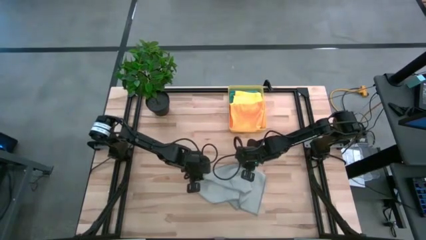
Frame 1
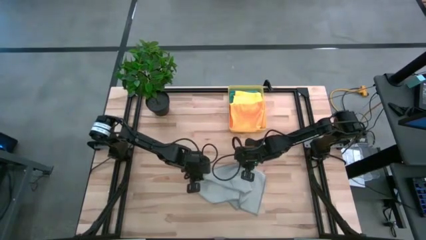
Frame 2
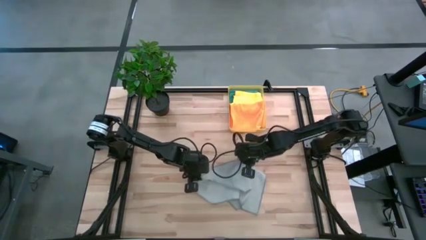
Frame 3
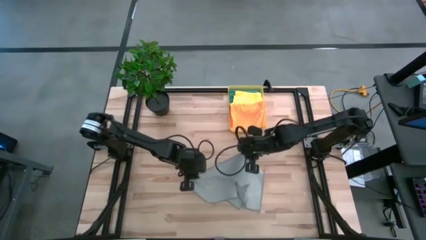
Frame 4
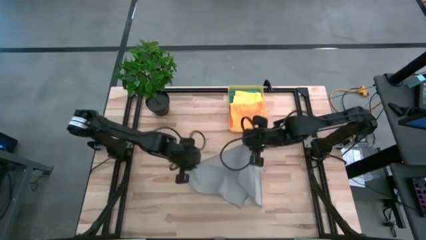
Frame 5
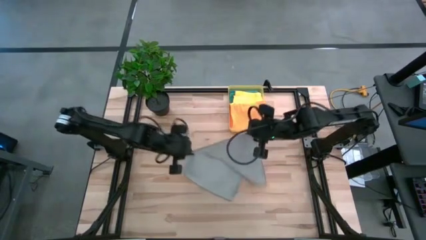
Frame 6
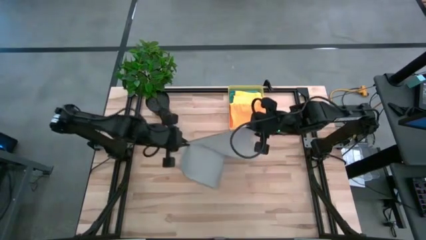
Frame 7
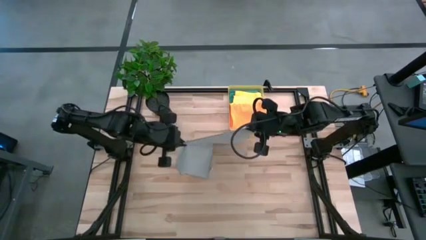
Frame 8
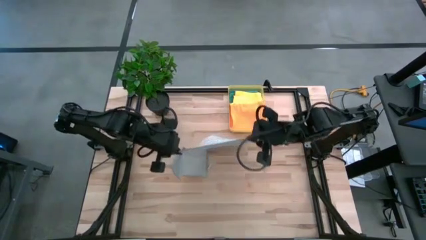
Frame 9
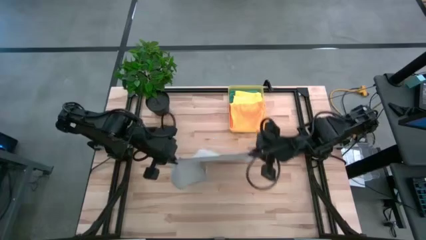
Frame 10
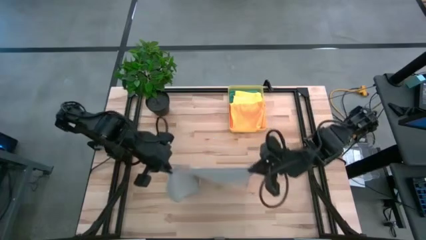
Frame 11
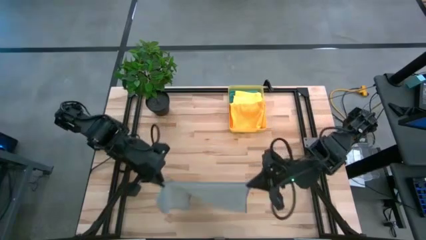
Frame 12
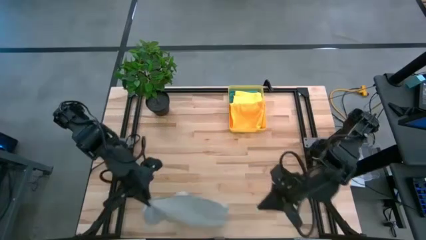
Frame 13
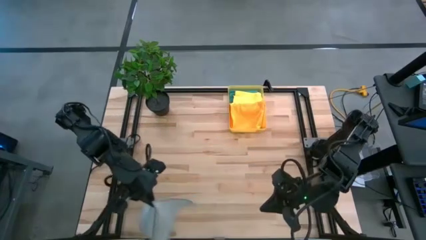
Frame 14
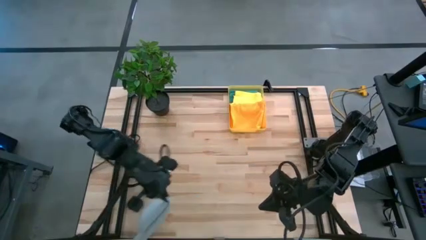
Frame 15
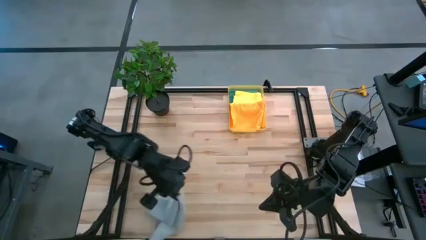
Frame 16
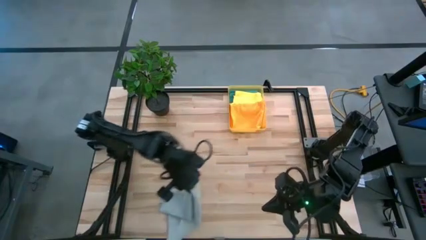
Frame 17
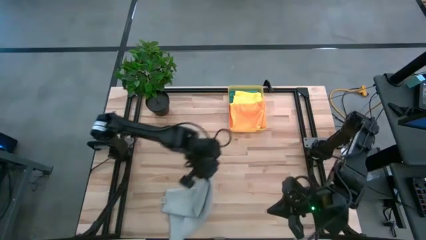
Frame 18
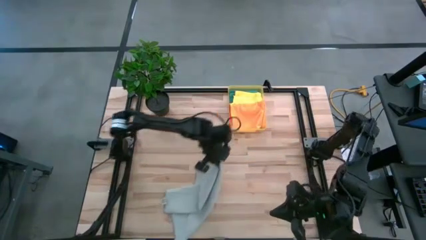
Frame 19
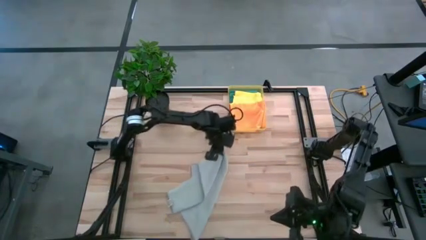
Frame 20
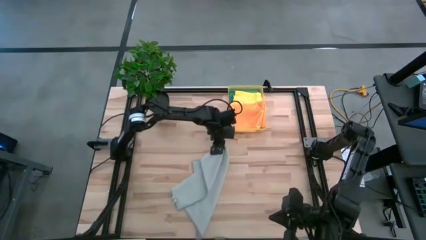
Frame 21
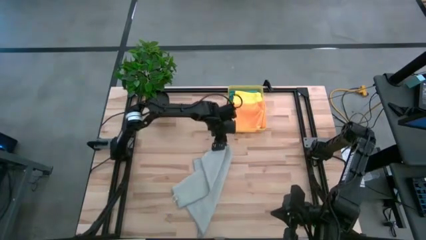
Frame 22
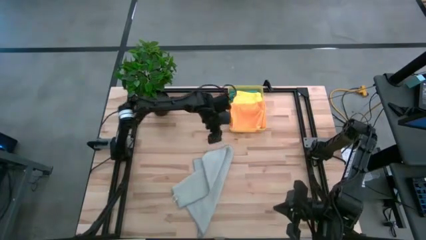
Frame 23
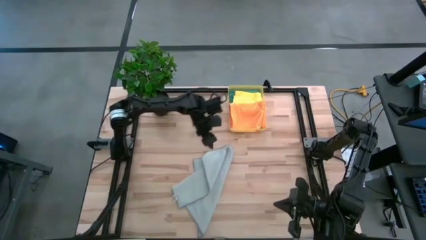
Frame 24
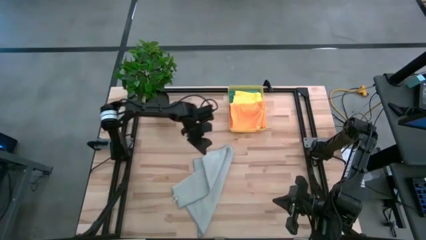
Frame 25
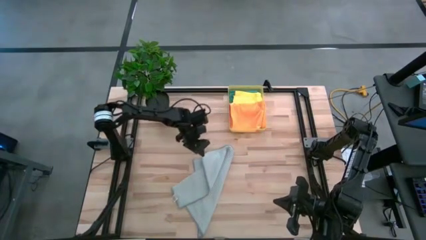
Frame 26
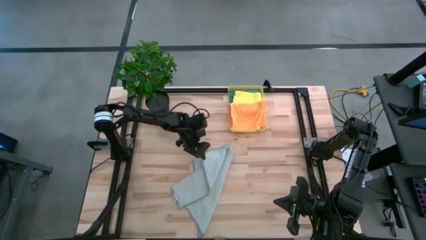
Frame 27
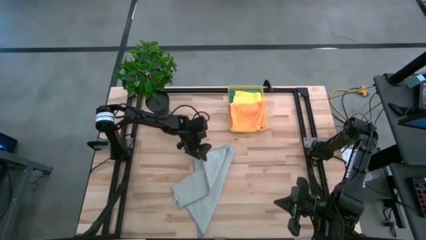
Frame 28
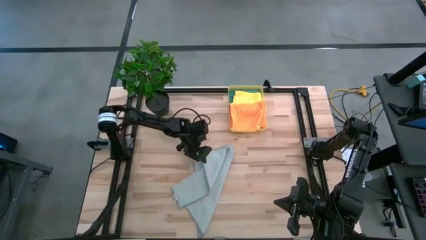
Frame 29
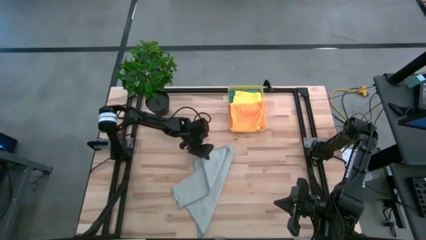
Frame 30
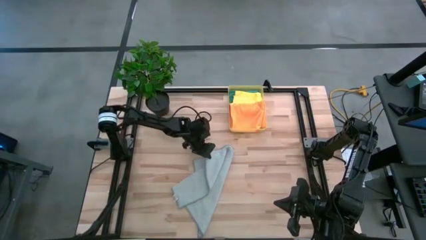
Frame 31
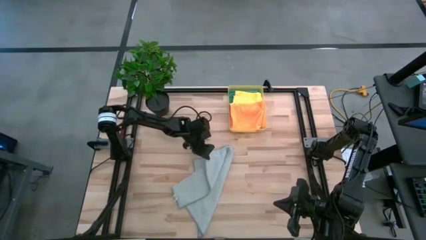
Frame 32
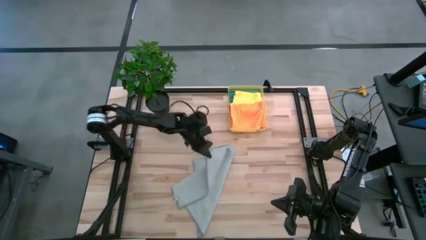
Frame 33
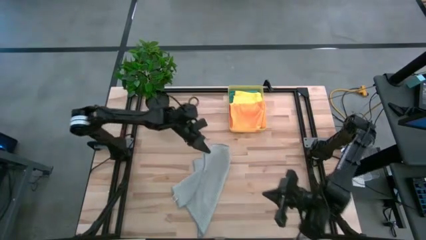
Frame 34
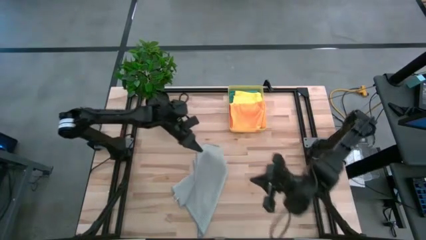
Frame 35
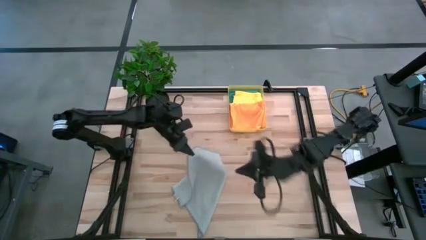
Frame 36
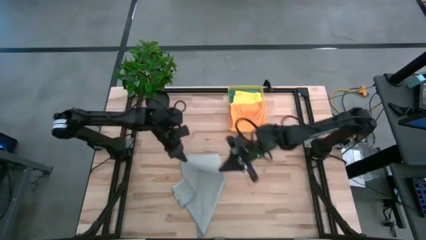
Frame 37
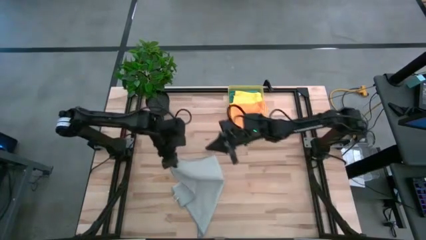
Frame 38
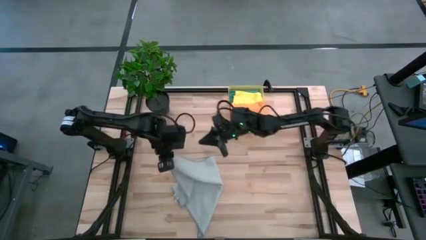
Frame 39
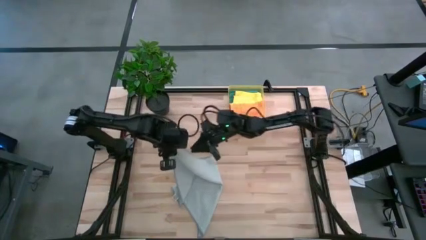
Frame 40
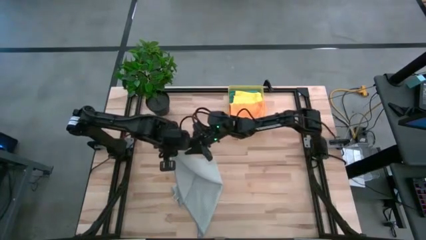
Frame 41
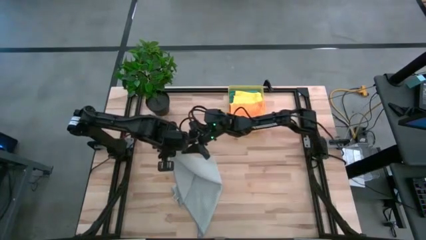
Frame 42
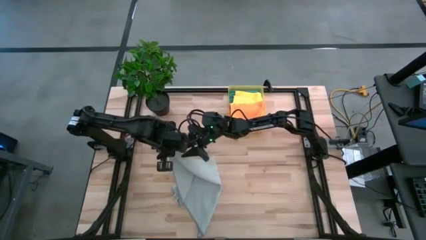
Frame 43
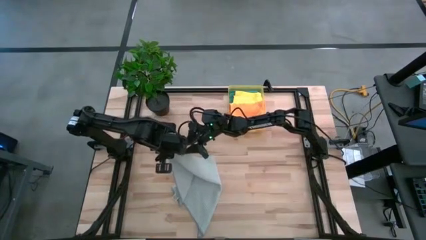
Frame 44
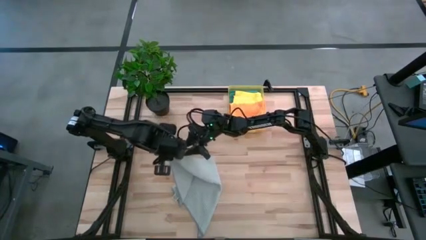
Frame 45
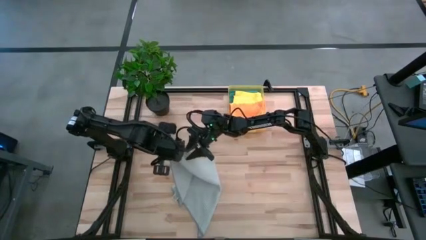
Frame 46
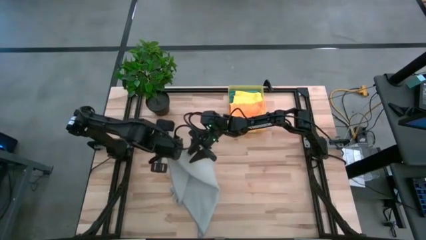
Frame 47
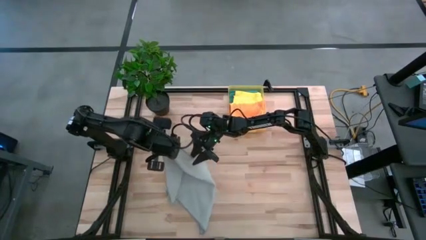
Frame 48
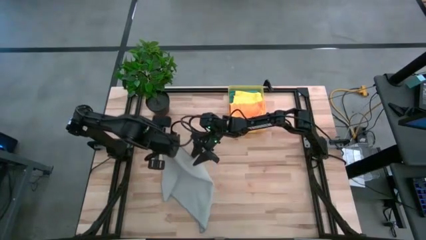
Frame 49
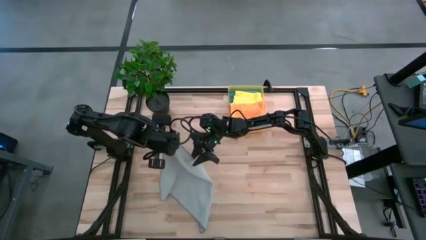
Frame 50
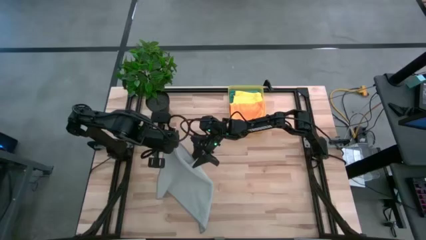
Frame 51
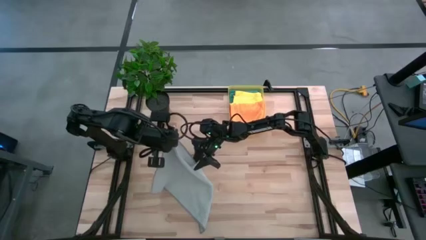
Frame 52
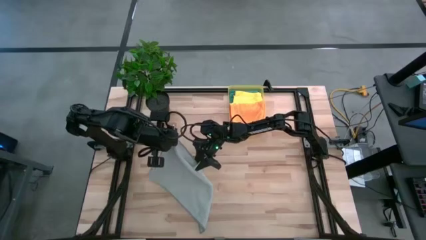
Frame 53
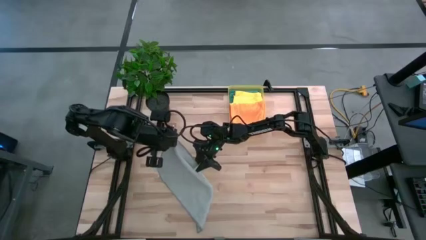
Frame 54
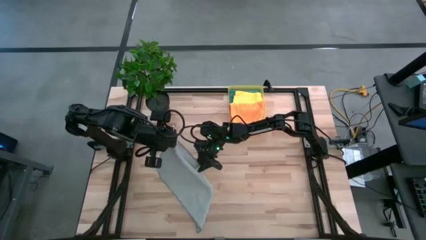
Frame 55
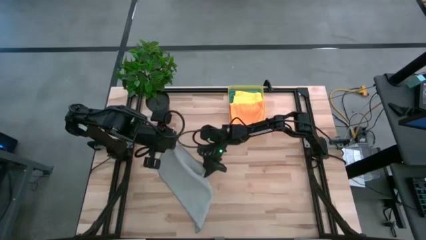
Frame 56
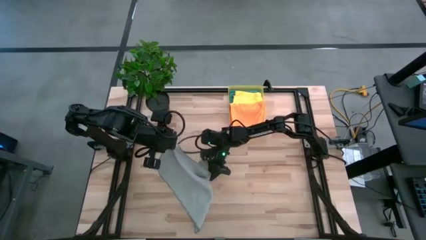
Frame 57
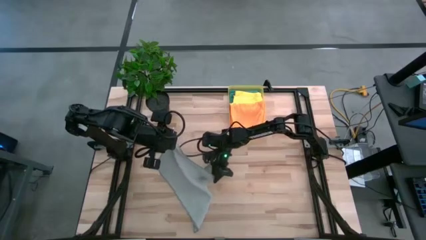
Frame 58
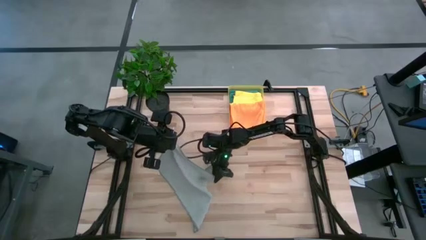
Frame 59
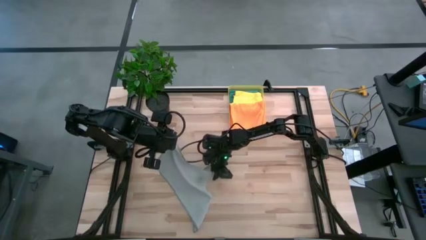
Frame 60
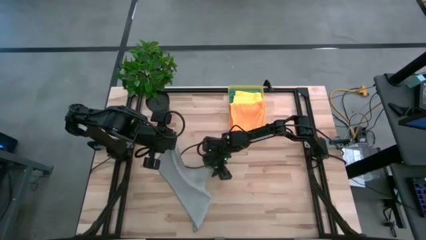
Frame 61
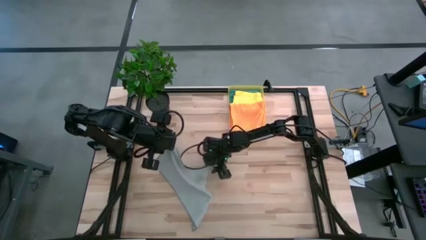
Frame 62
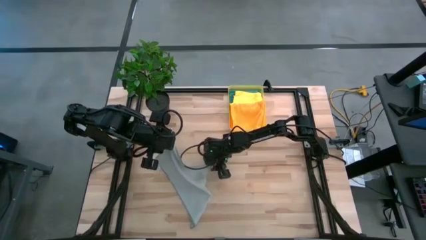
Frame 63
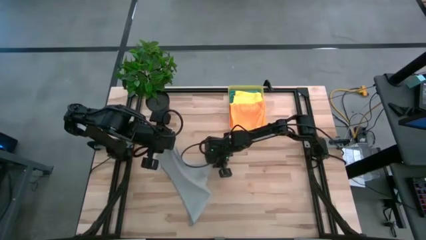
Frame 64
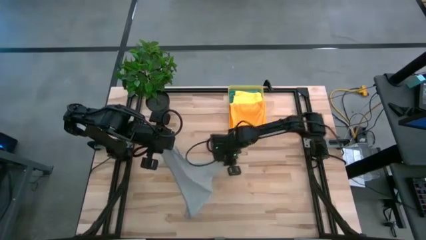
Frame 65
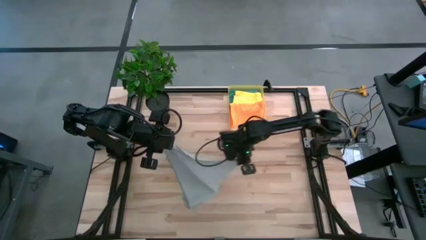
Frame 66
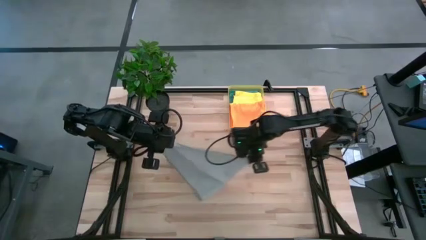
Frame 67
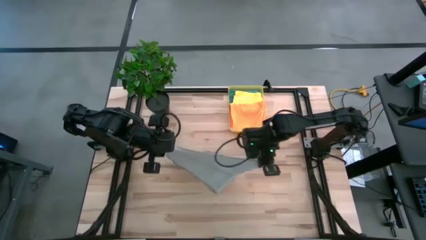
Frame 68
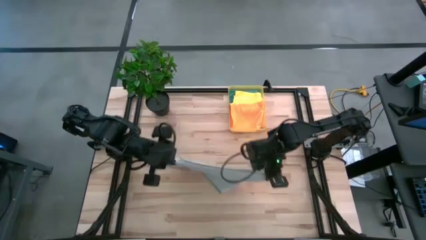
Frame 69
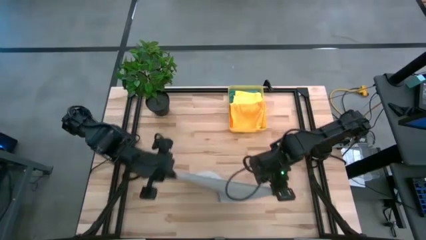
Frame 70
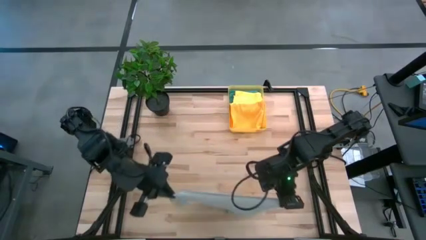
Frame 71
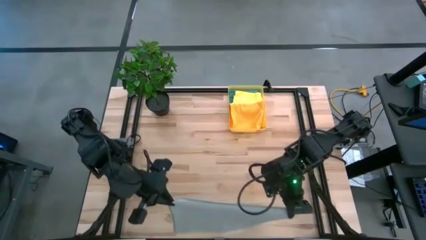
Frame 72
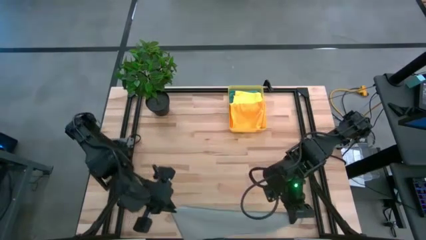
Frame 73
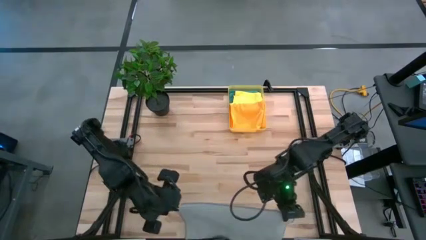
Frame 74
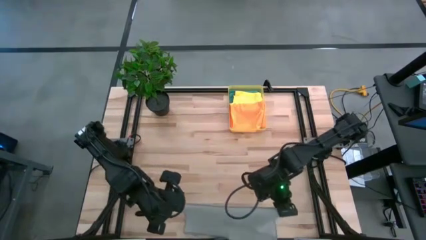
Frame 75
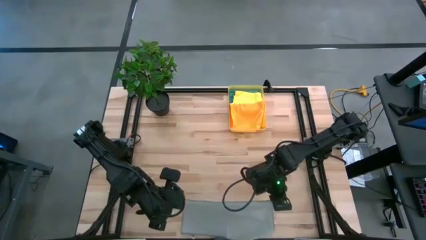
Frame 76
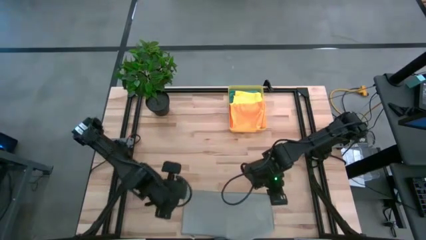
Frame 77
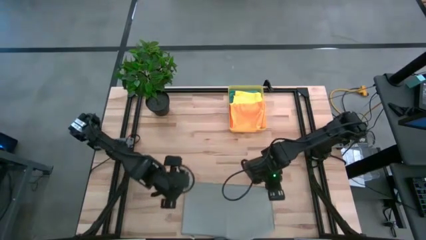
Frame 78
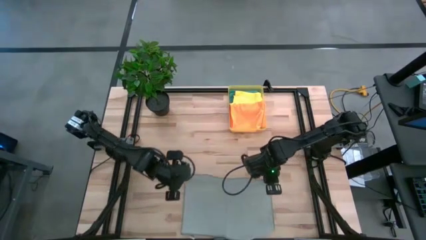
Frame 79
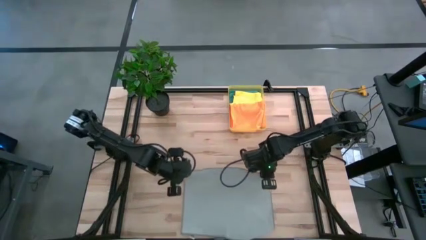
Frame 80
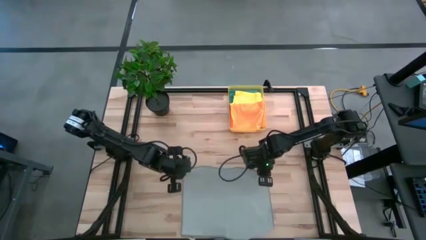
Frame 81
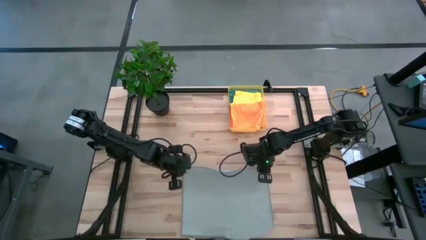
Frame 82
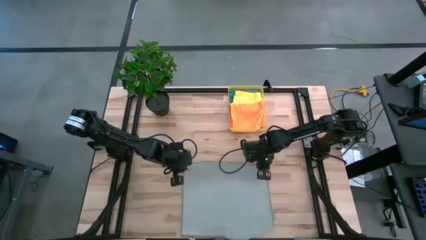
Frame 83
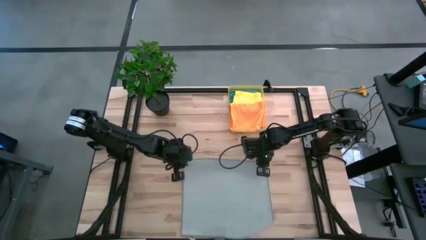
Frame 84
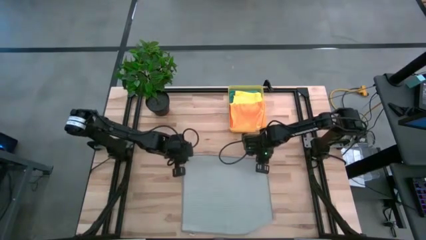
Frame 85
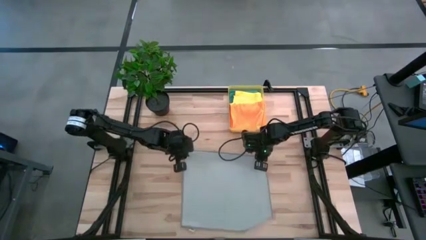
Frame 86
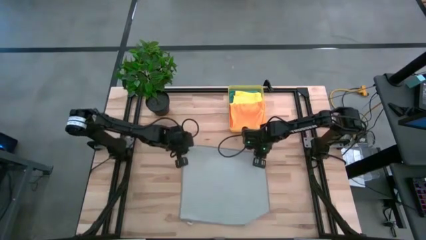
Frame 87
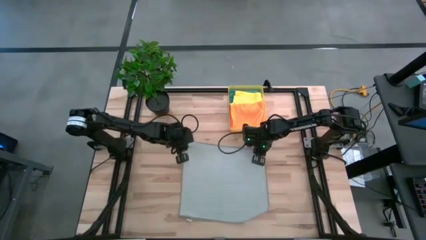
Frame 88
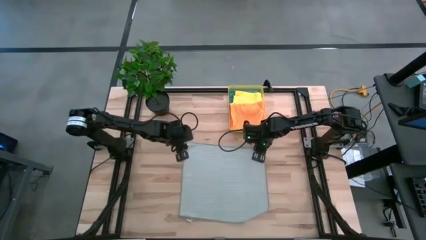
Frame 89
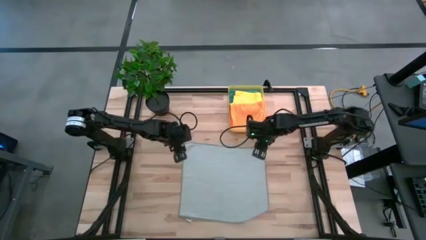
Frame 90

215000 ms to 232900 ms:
Task: Fold microfiber towels
Fold the gray microfiber towel
